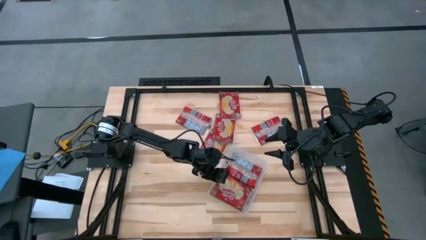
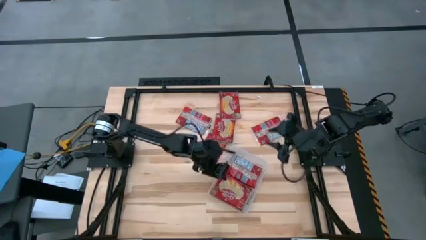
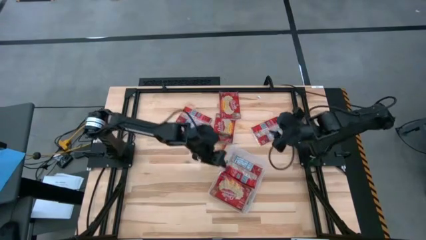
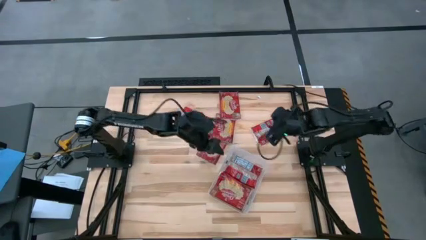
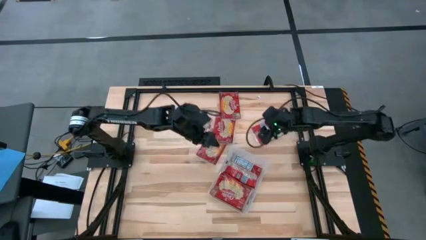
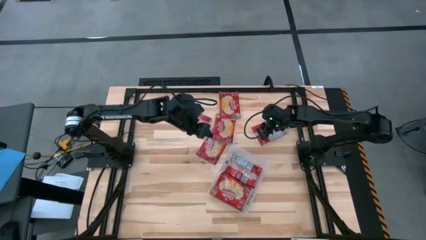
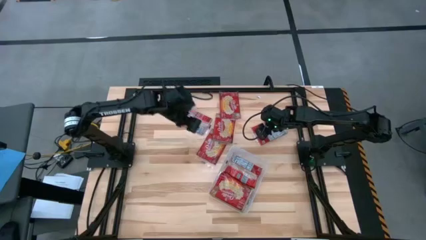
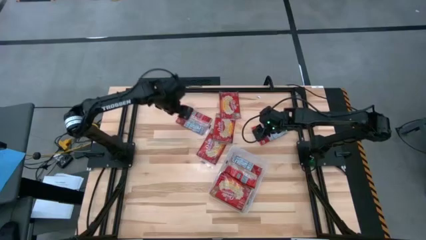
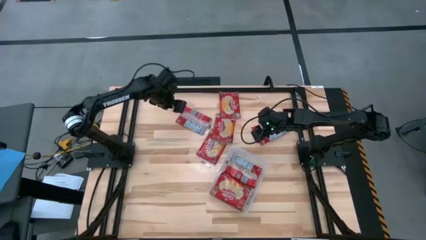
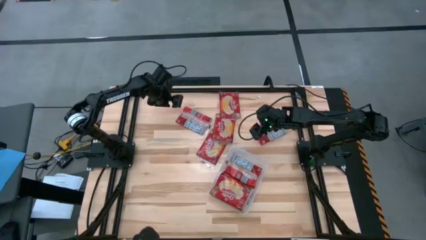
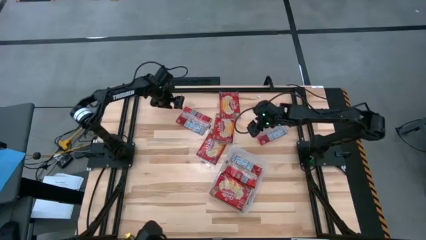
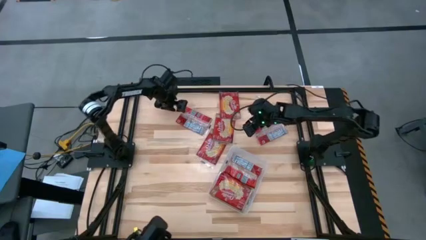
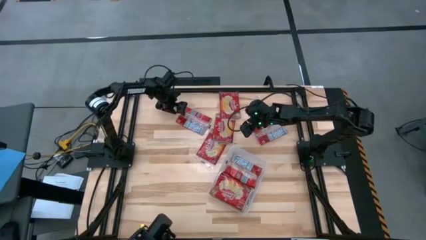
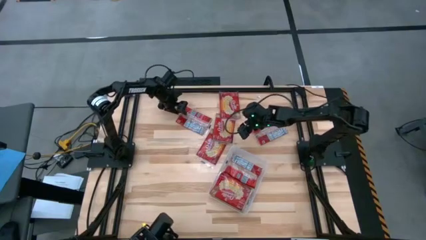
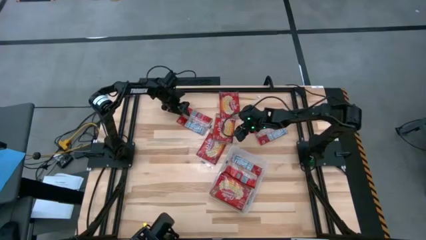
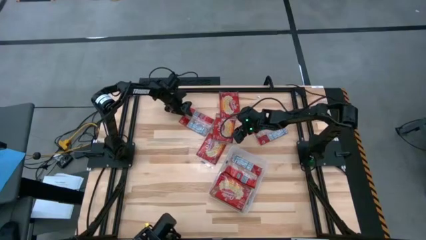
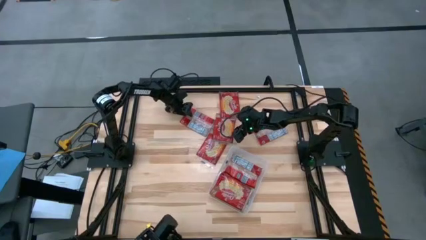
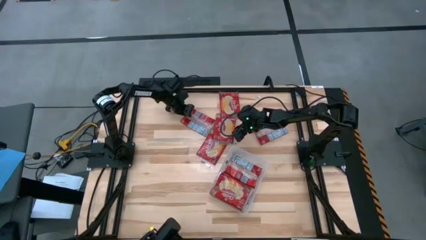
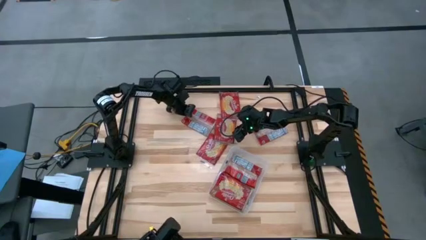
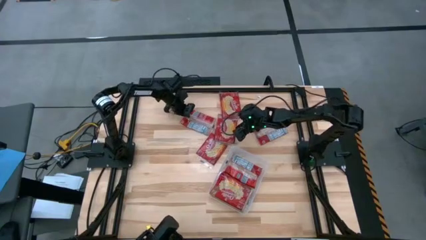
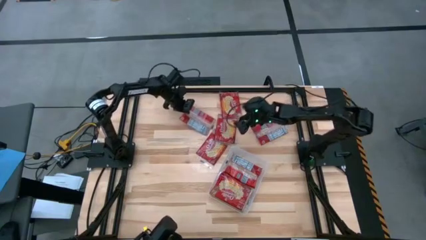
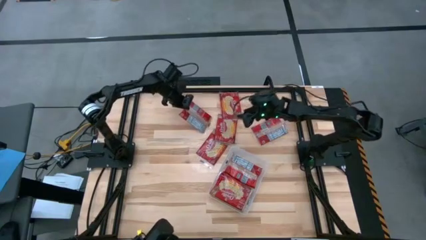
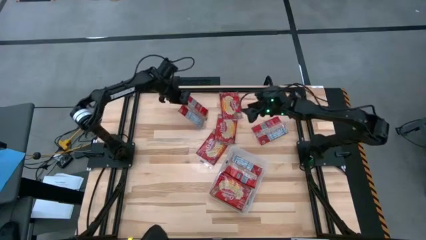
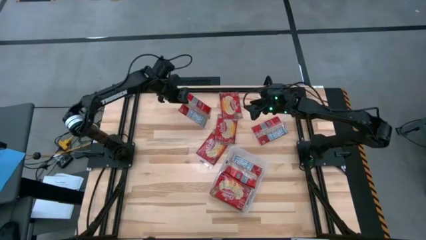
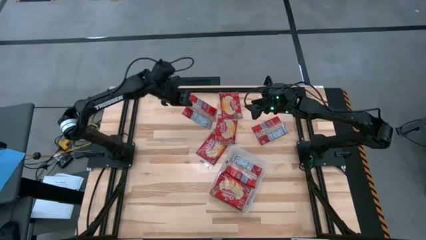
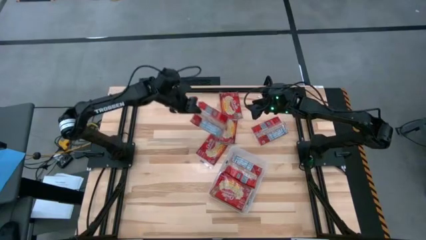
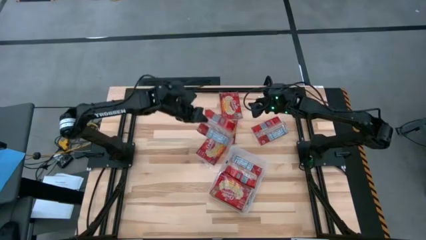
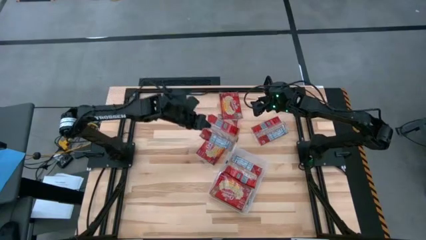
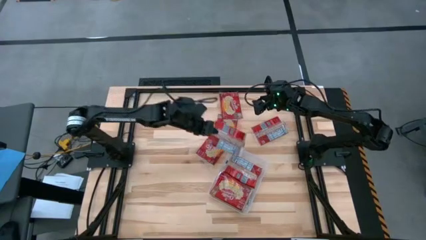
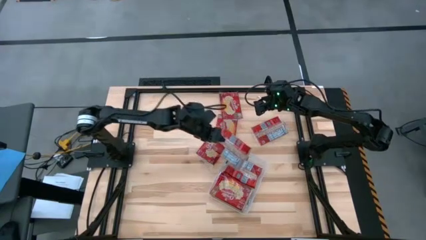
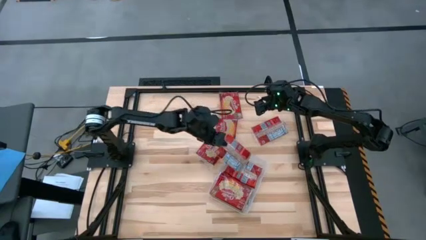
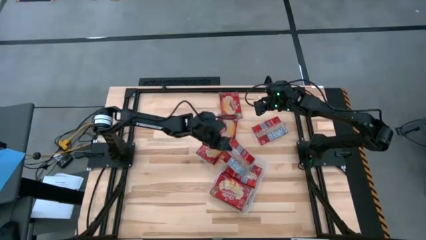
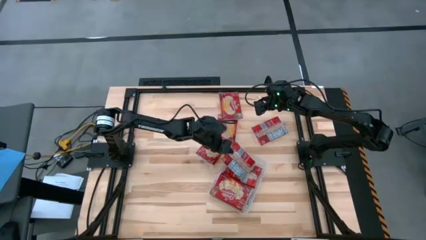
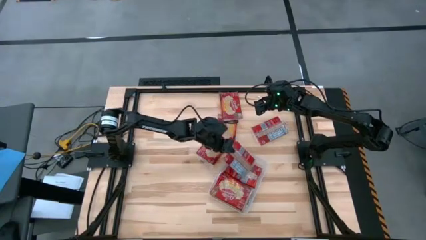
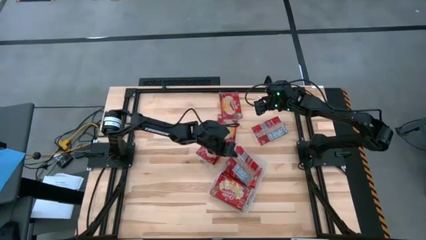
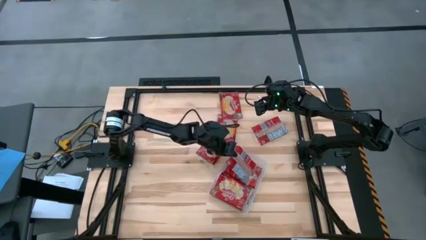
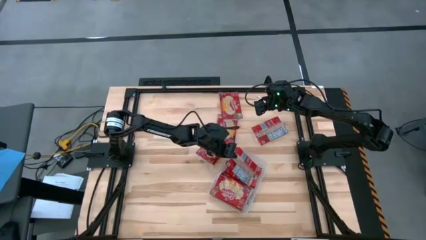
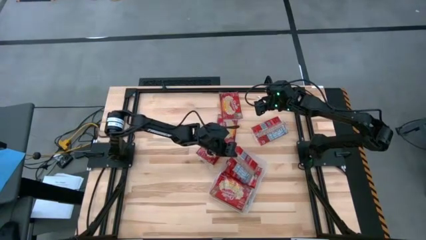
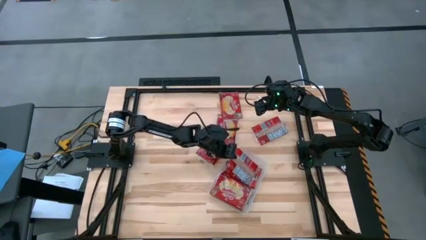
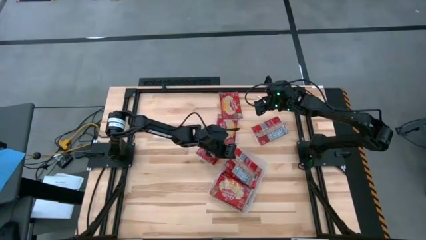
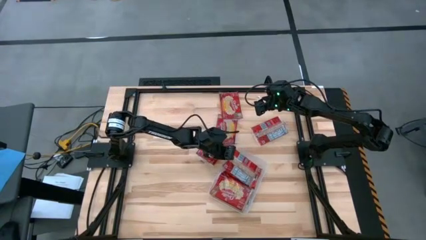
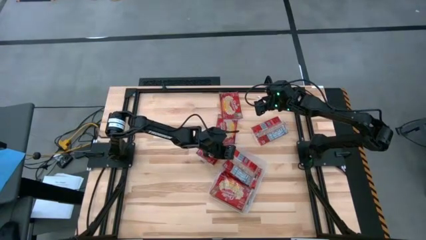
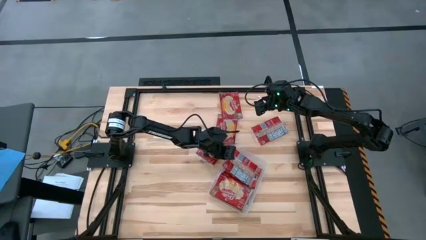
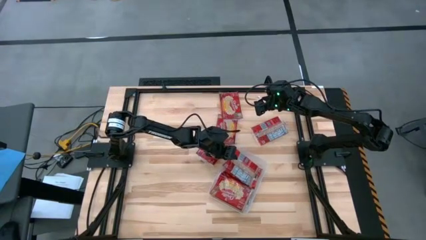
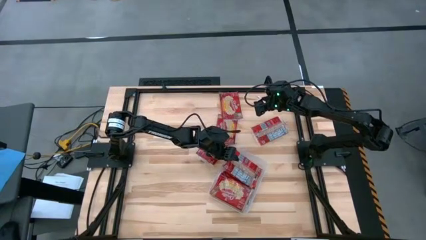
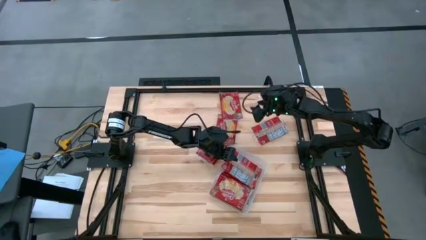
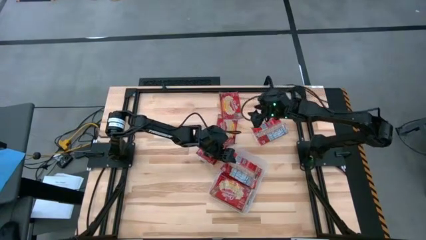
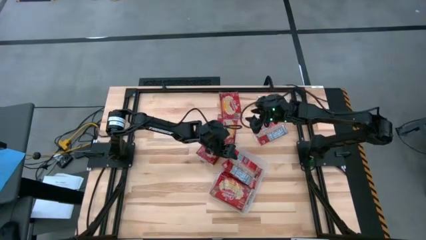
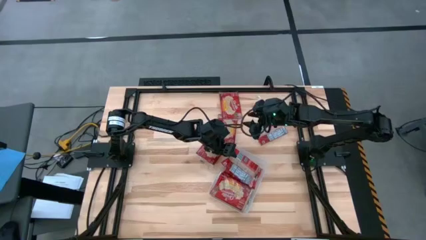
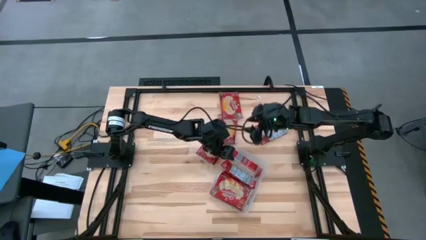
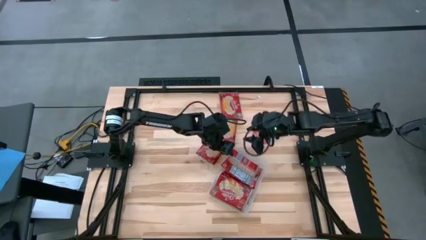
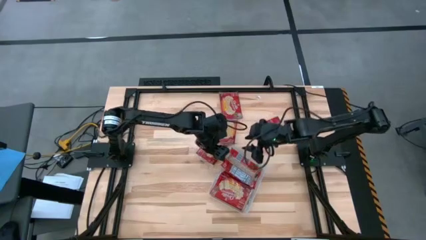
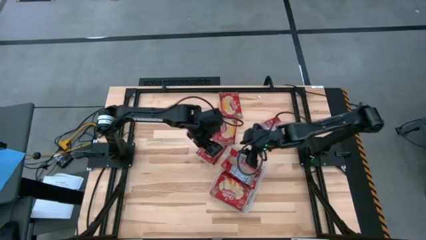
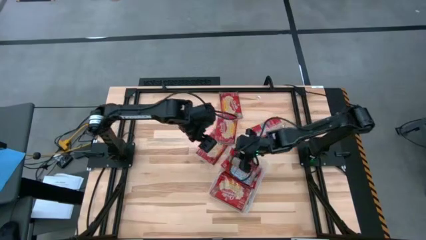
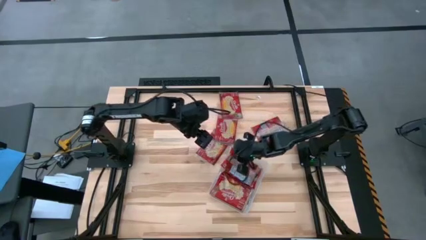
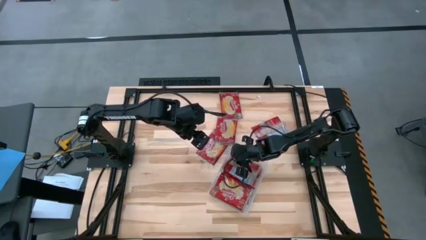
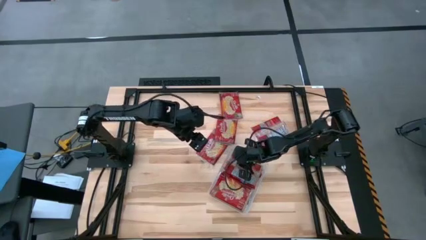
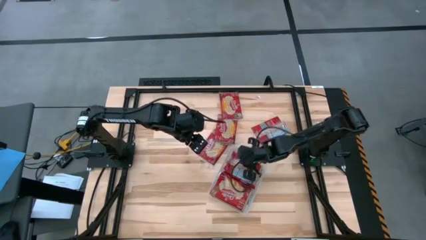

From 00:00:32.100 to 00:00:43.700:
Task: Sort popcorn bags into baskets
Put the red popcorn bag into the transparent bin
